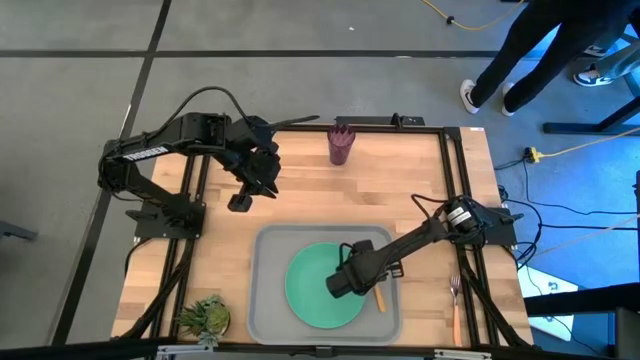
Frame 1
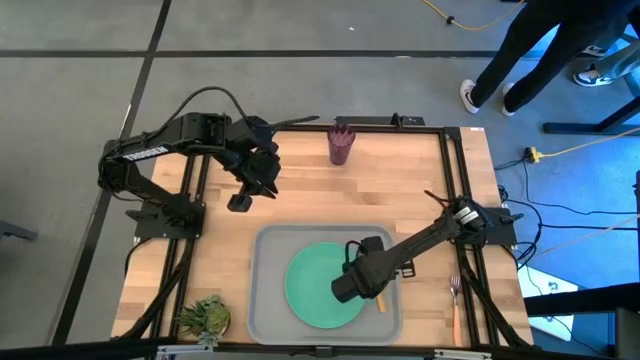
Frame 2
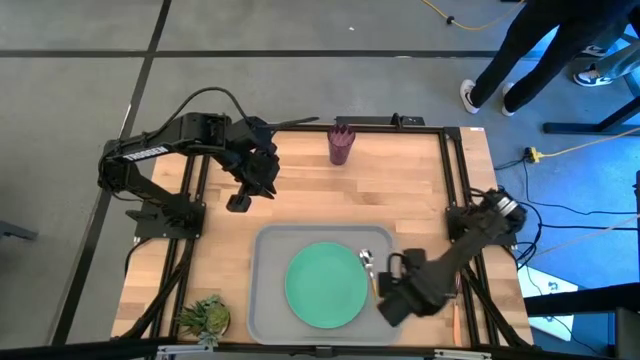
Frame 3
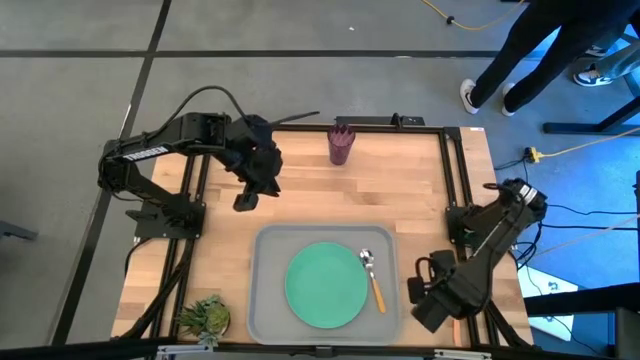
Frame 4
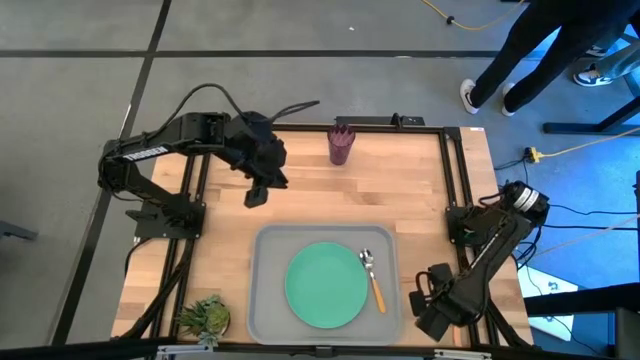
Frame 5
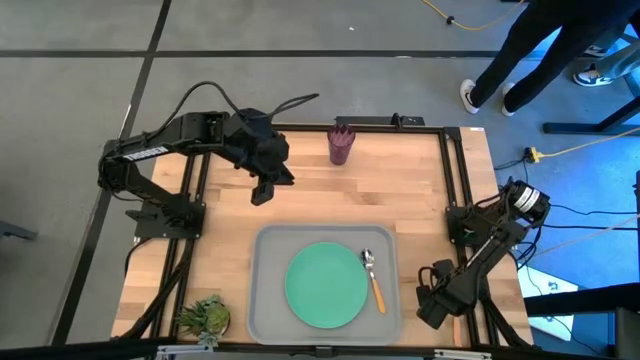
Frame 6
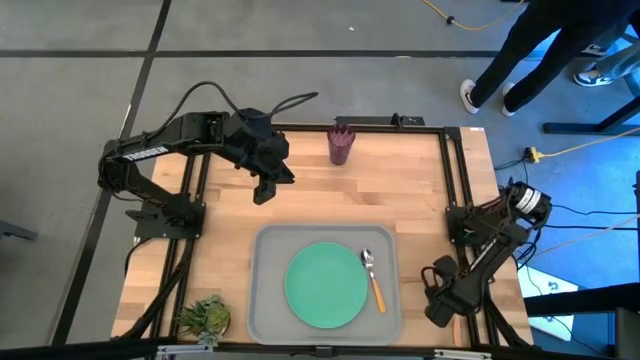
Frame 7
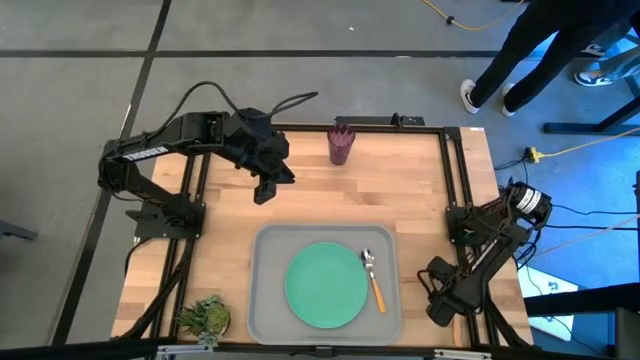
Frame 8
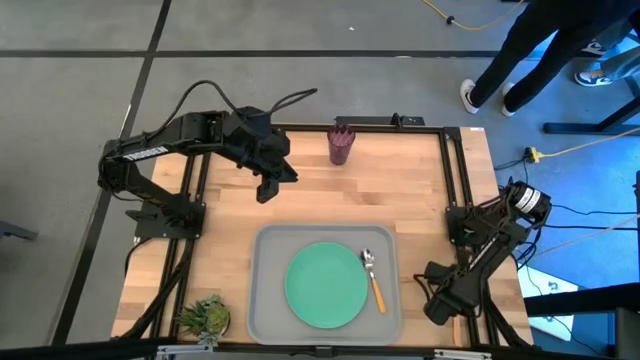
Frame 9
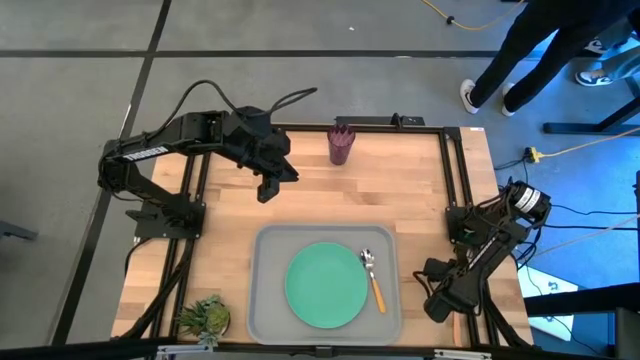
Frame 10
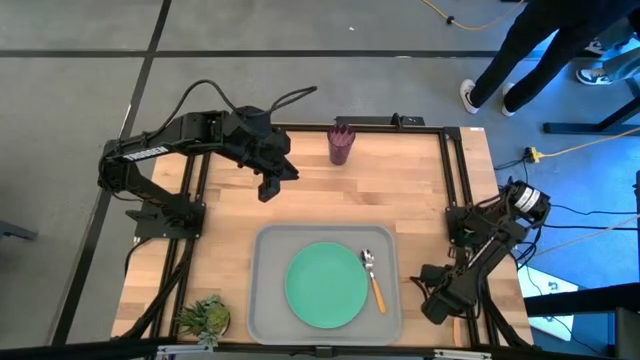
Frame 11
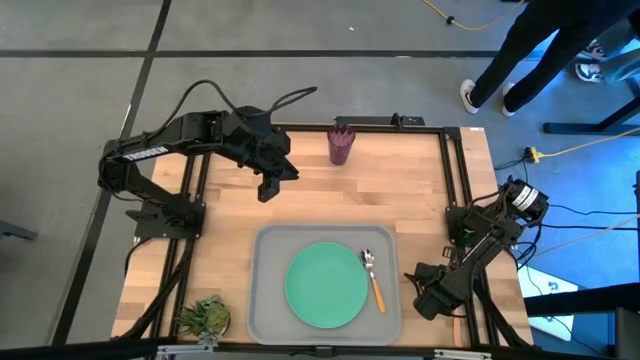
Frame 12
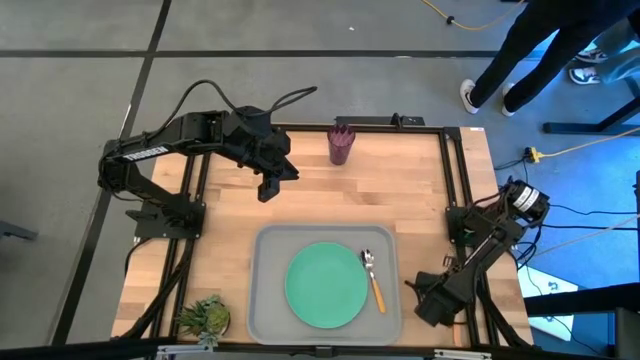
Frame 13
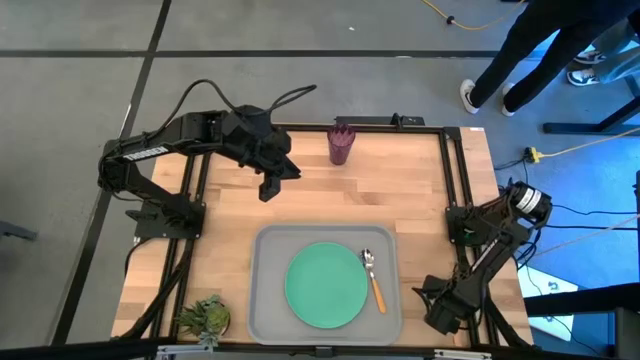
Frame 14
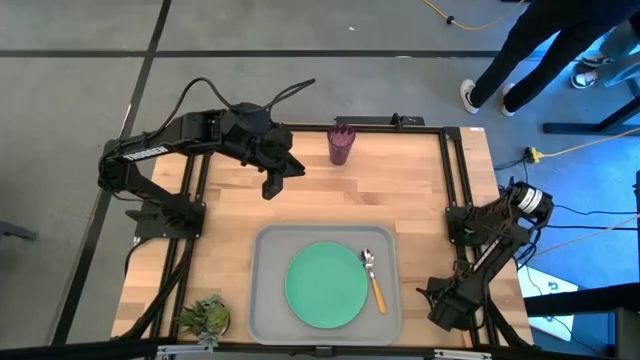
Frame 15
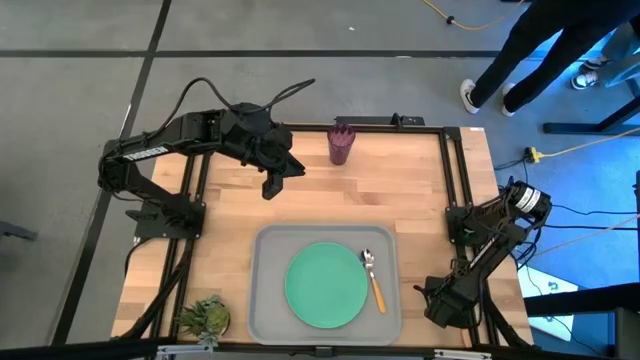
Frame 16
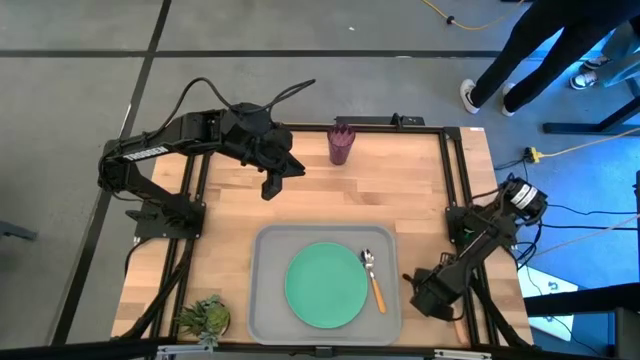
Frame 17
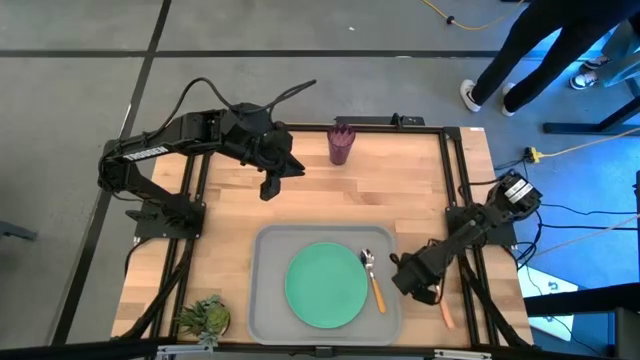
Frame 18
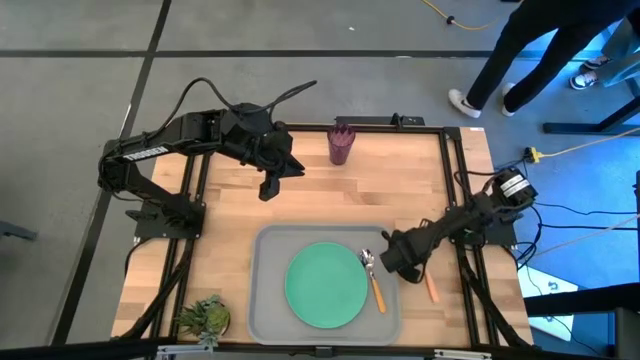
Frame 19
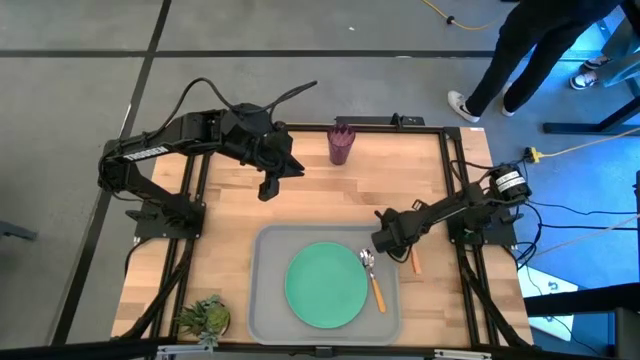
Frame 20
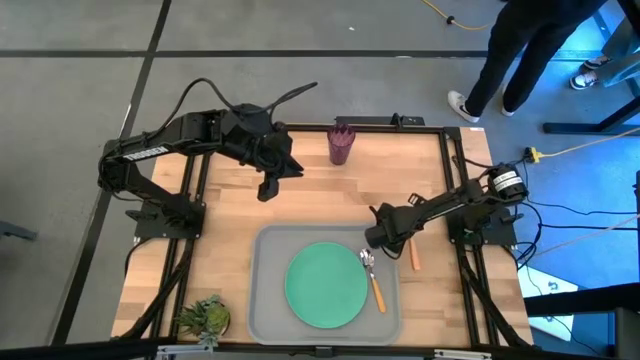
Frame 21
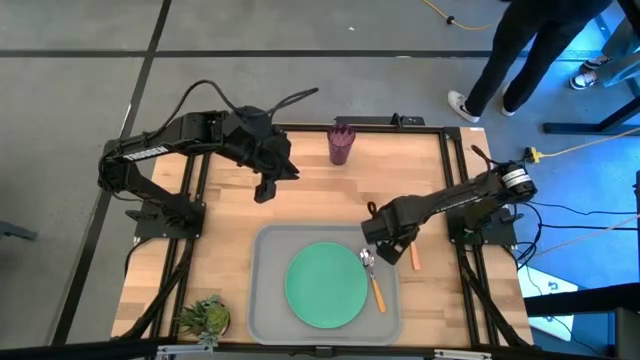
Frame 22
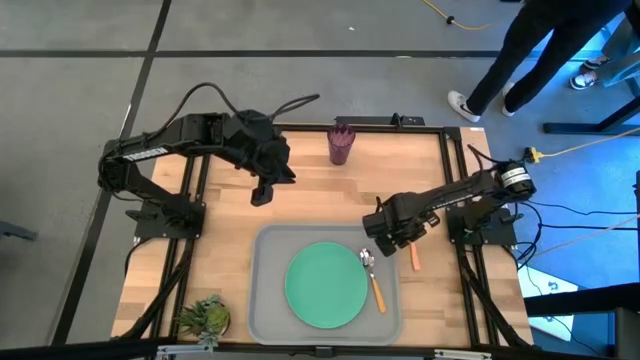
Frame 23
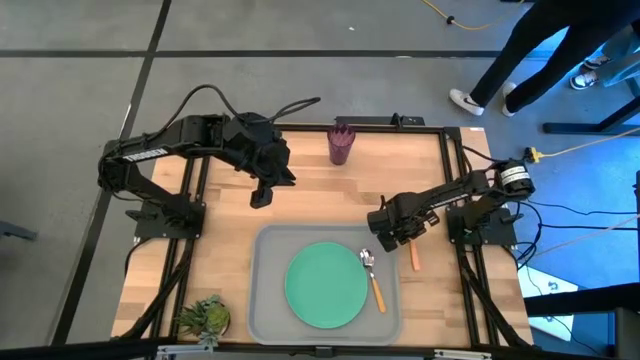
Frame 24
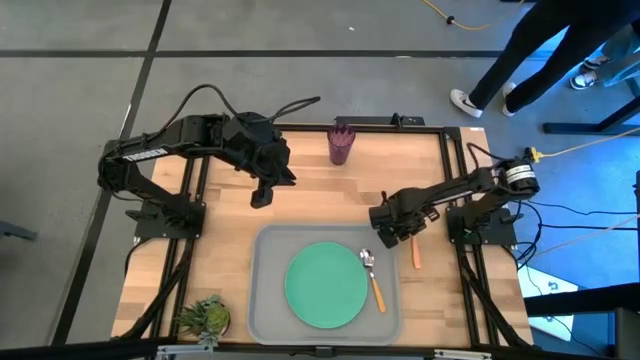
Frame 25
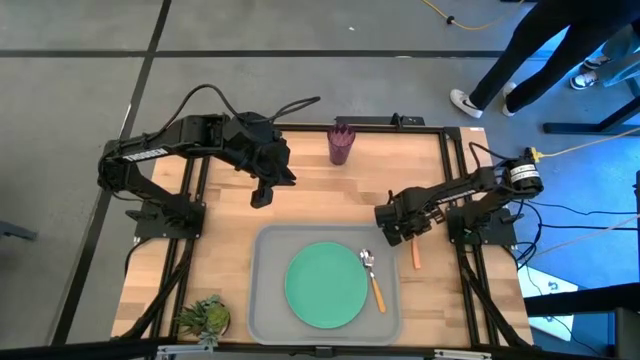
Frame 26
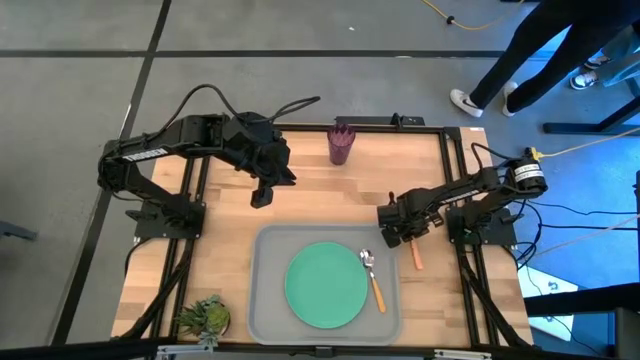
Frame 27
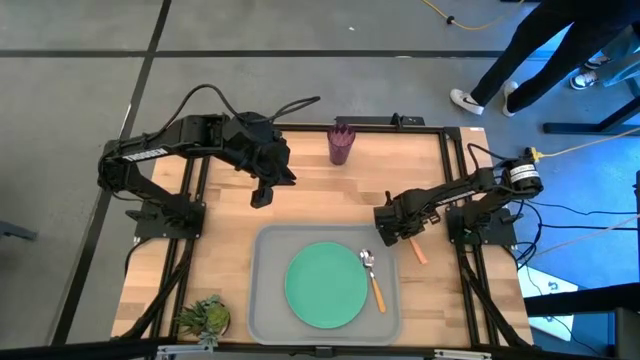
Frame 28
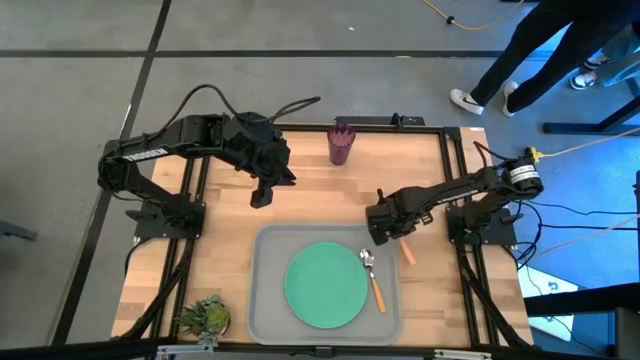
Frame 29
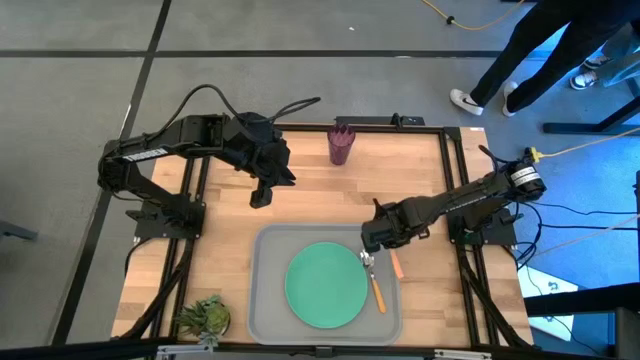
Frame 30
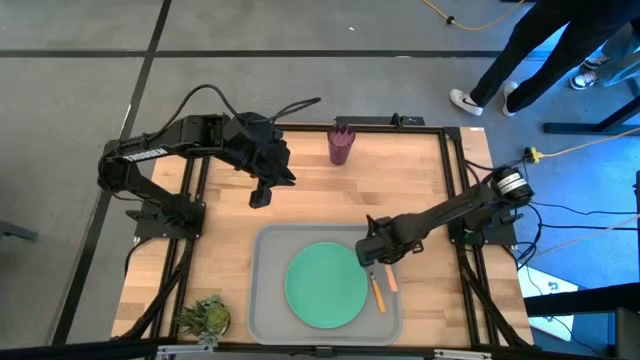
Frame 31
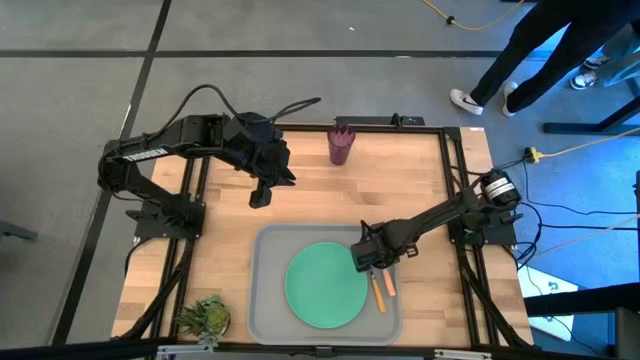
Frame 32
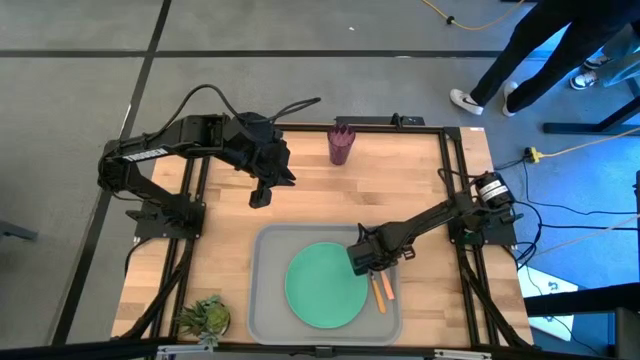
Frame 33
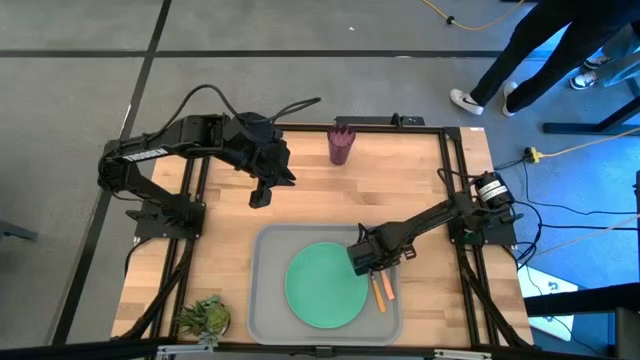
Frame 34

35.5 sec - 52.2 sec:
Task: Pick and place plate/cup/fork/spoon on tray
Put the light orange fork on the gray tray to the right of the orange spoon

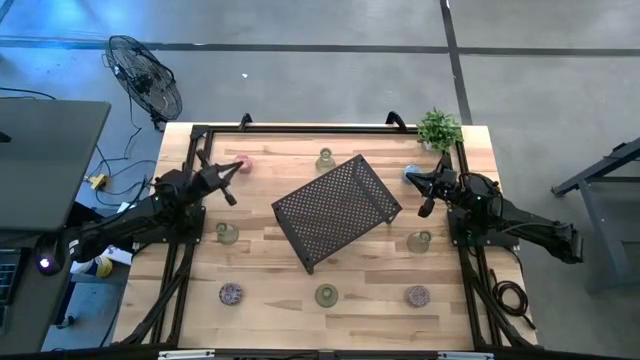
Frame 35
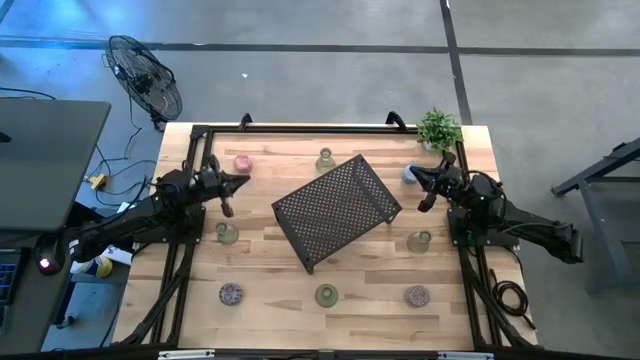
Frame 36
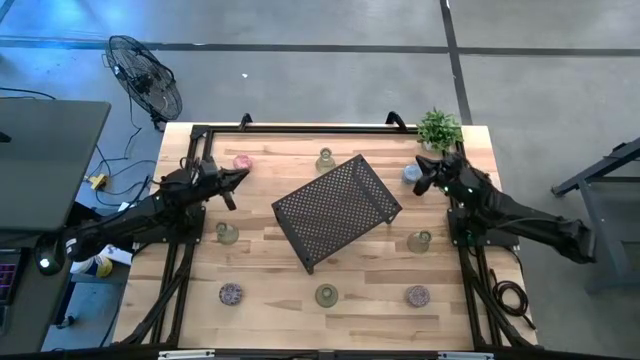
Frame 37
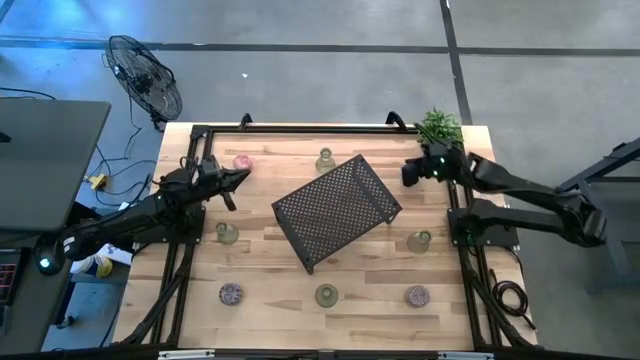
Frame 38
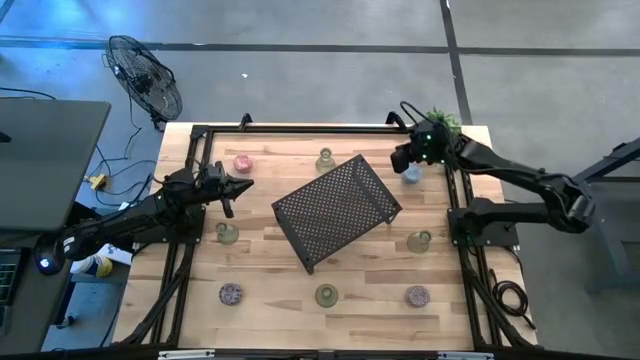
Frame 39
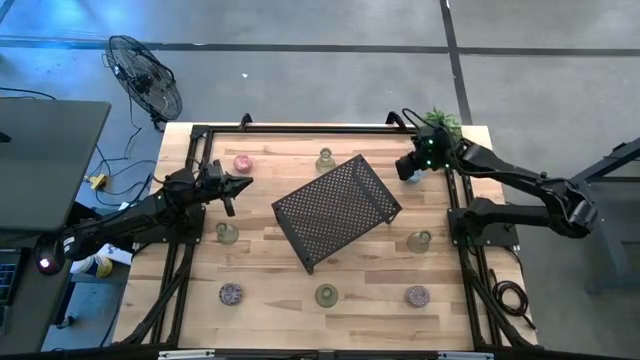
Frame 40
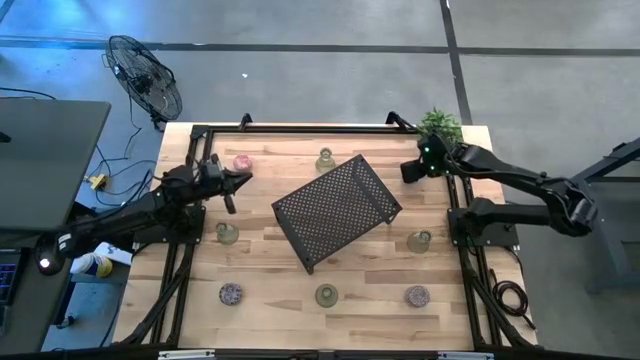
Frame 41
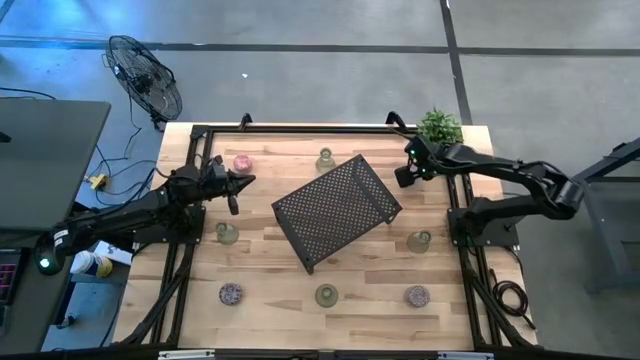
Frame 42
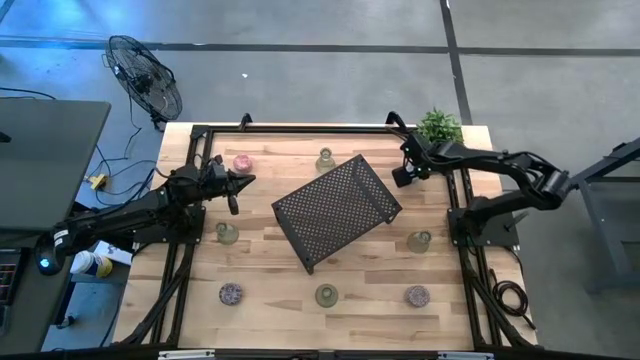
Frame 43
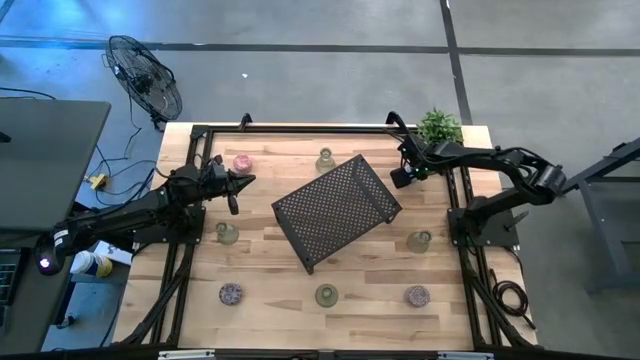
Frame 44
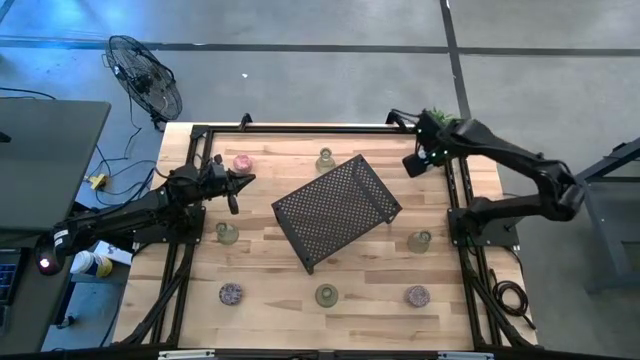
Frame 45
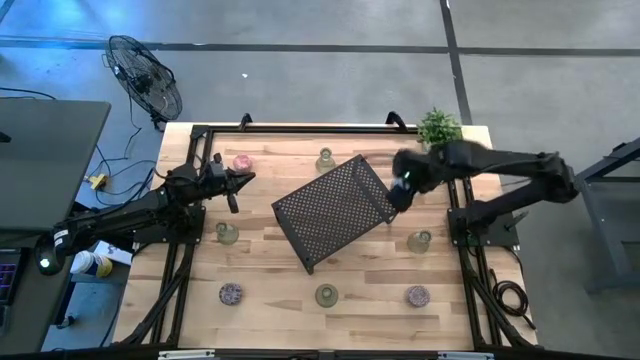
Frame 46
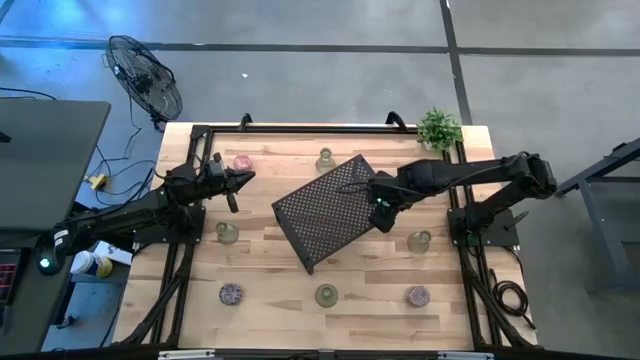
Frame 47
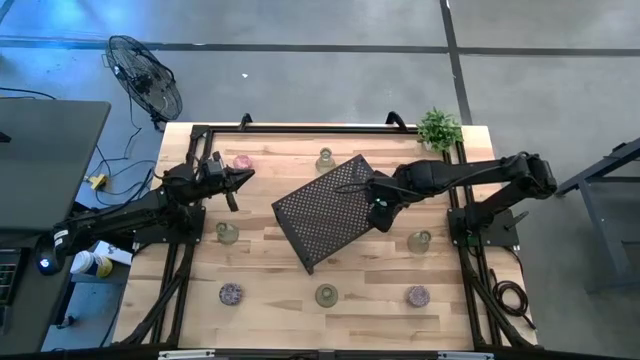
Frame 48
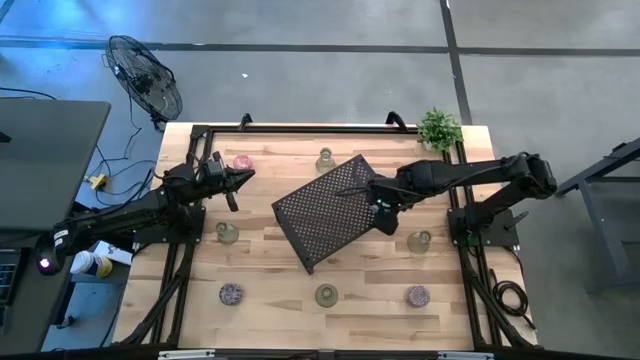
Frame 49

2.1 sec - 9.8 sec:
Task: Pick & Place candle stick holders
Put the blue scented candle on the shelf
